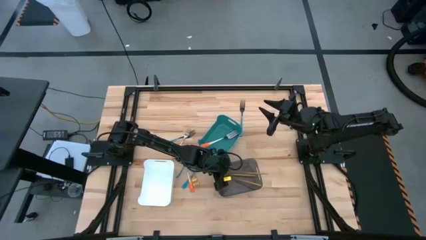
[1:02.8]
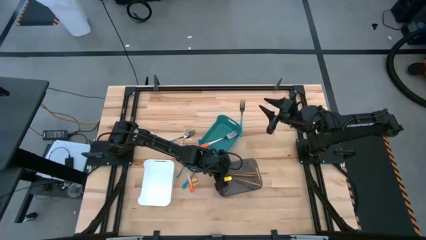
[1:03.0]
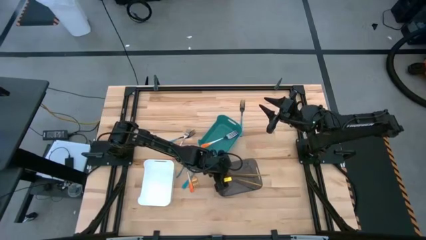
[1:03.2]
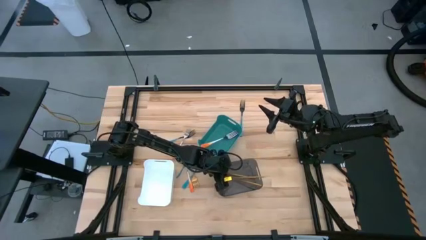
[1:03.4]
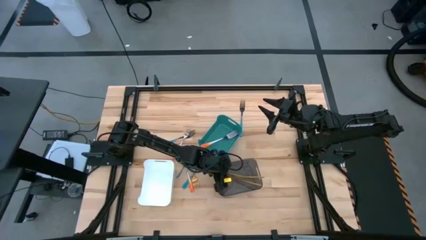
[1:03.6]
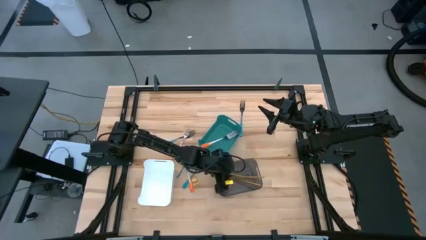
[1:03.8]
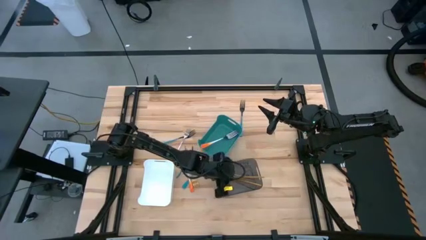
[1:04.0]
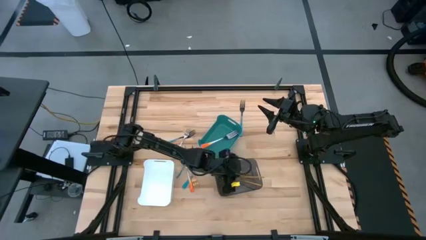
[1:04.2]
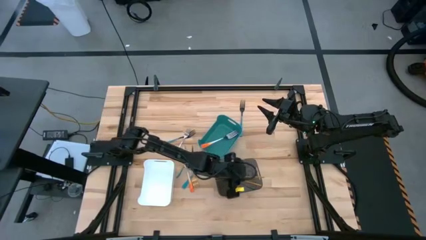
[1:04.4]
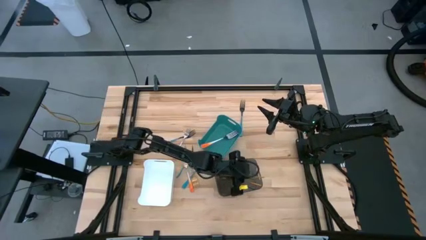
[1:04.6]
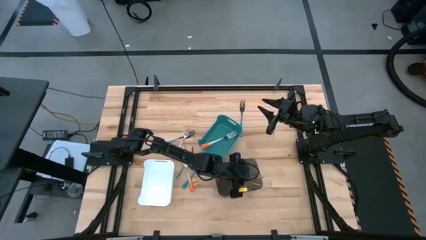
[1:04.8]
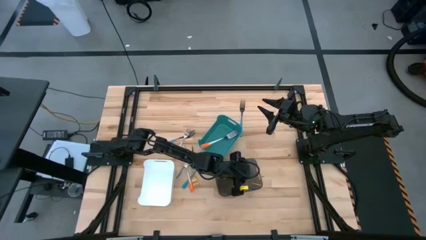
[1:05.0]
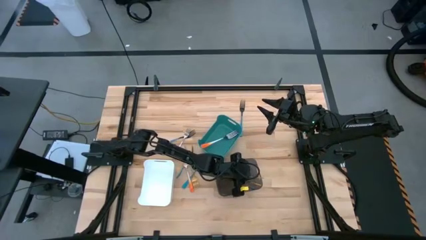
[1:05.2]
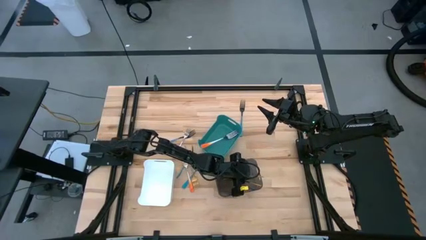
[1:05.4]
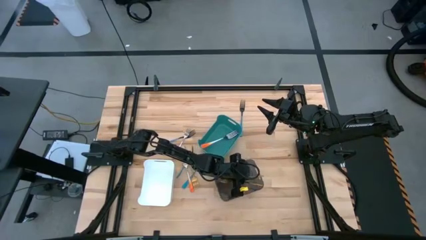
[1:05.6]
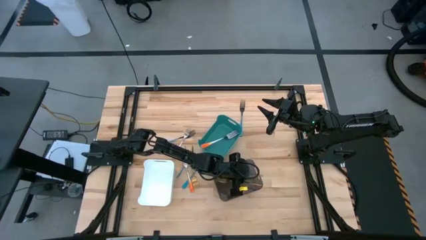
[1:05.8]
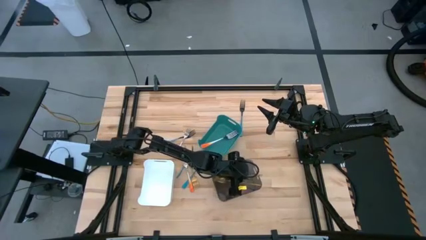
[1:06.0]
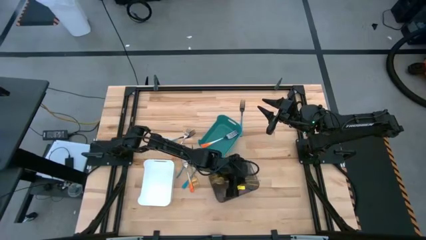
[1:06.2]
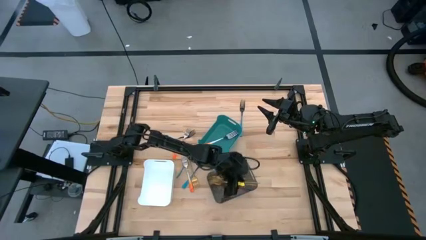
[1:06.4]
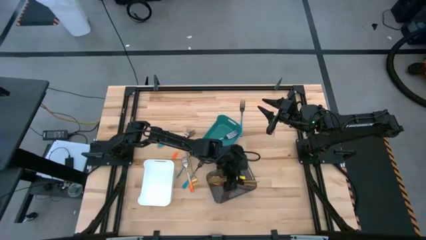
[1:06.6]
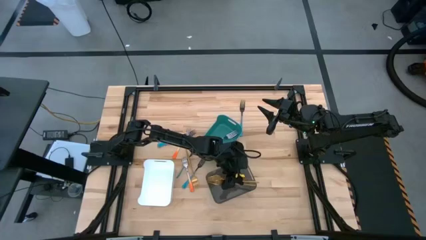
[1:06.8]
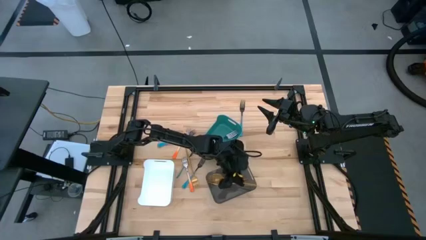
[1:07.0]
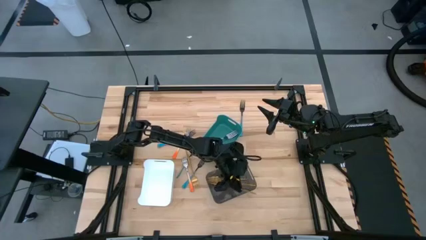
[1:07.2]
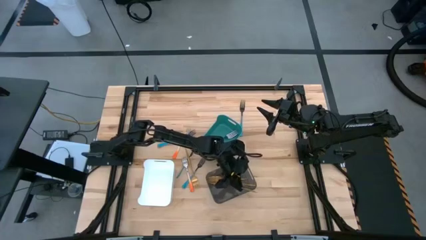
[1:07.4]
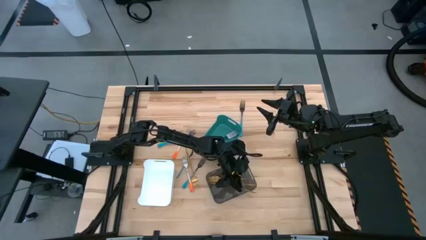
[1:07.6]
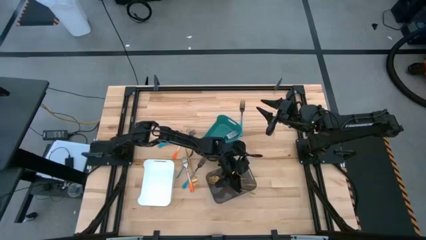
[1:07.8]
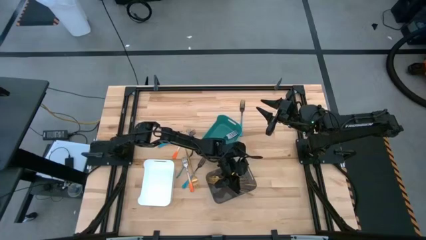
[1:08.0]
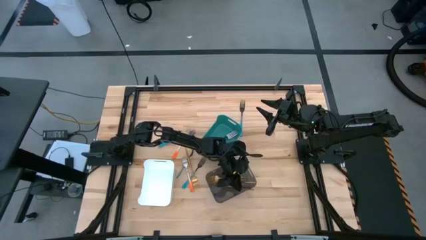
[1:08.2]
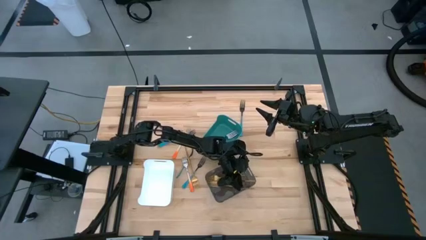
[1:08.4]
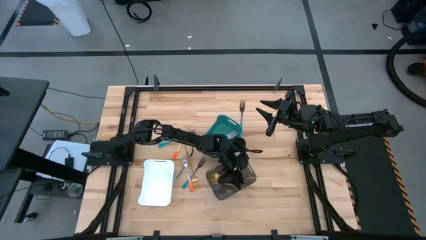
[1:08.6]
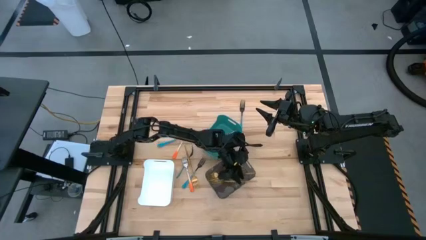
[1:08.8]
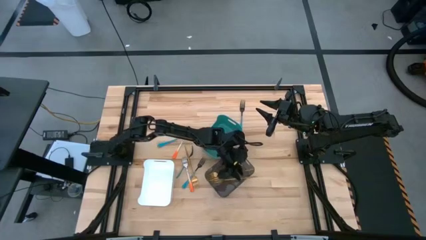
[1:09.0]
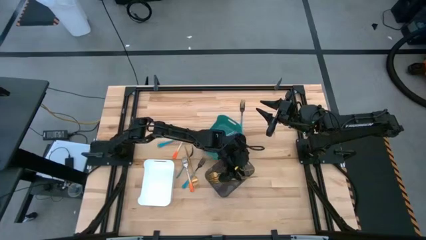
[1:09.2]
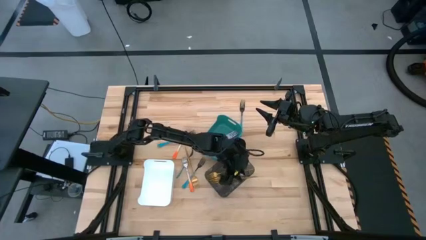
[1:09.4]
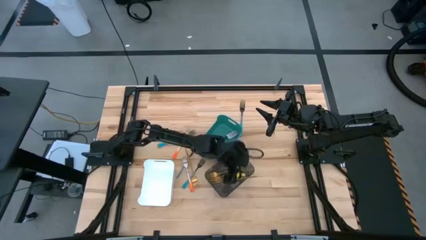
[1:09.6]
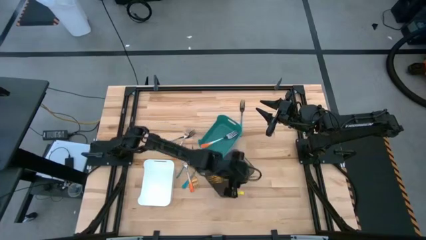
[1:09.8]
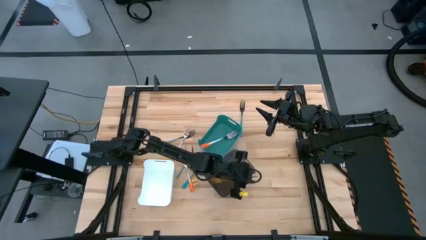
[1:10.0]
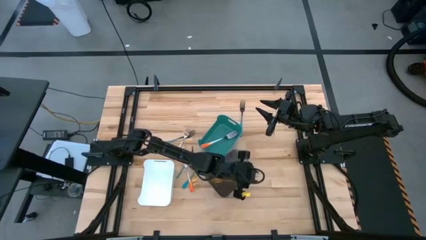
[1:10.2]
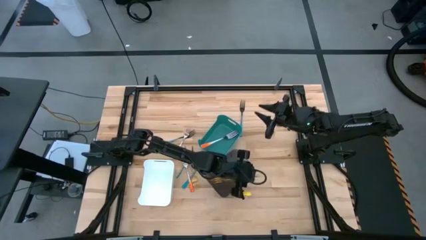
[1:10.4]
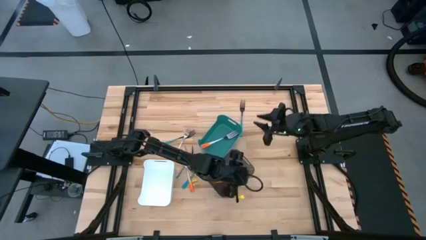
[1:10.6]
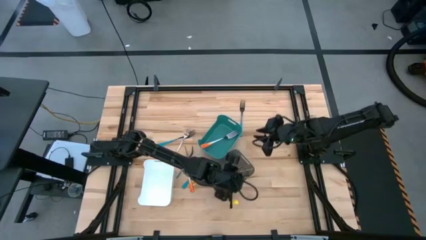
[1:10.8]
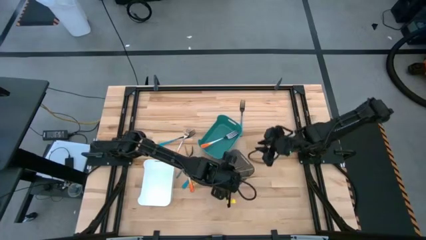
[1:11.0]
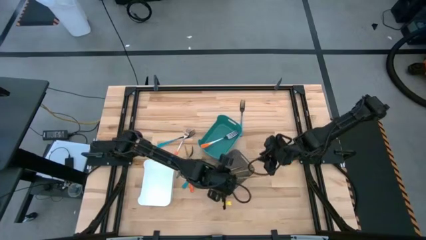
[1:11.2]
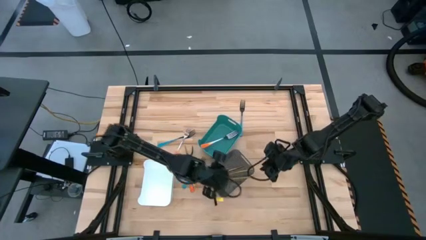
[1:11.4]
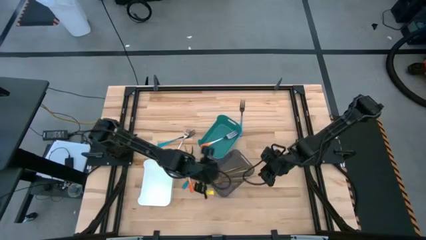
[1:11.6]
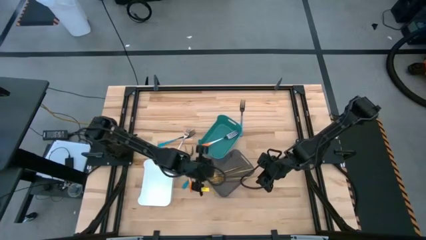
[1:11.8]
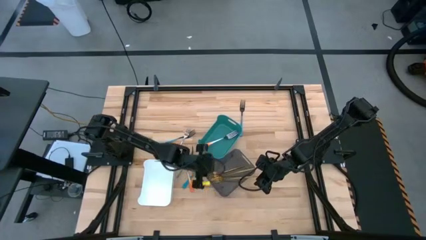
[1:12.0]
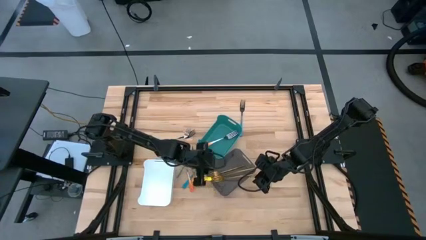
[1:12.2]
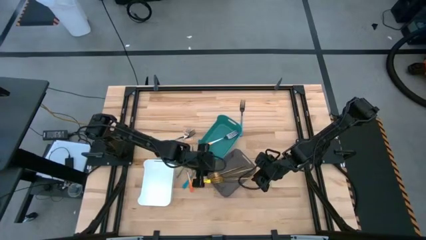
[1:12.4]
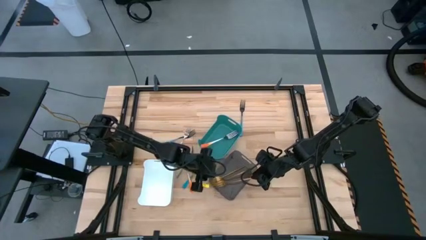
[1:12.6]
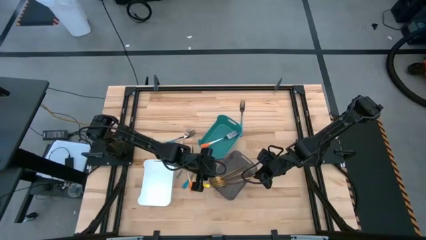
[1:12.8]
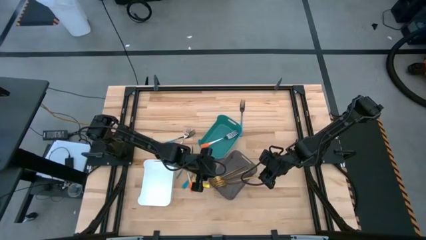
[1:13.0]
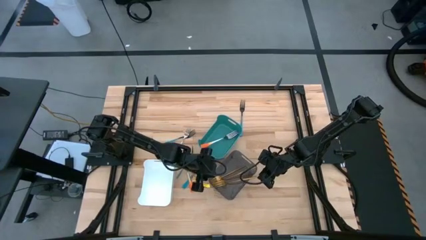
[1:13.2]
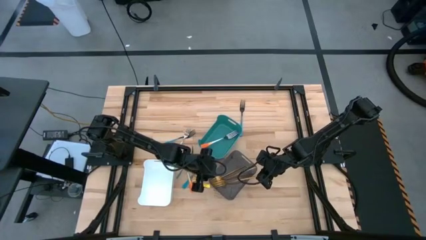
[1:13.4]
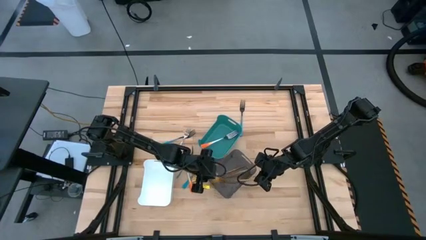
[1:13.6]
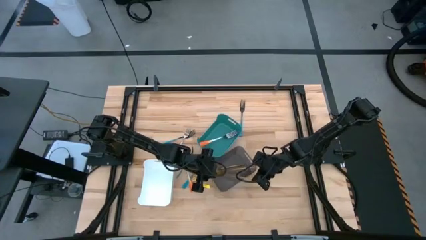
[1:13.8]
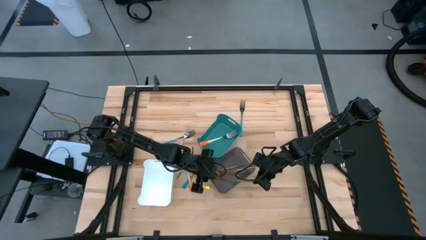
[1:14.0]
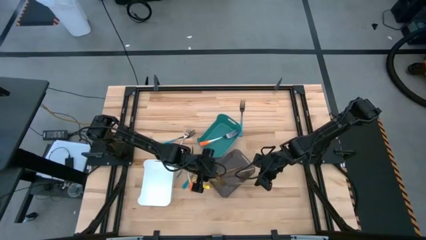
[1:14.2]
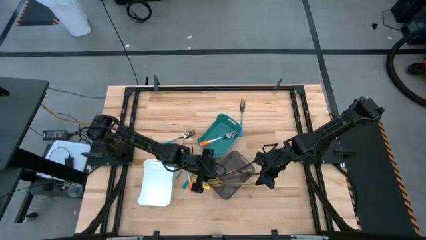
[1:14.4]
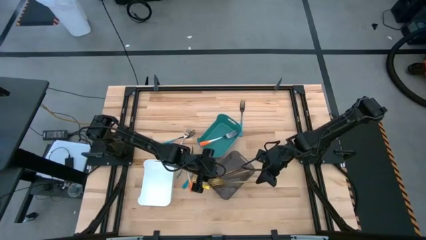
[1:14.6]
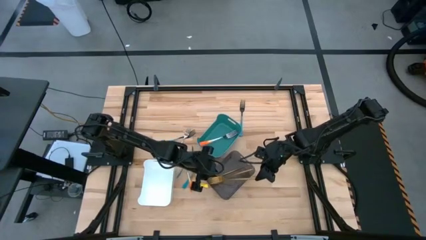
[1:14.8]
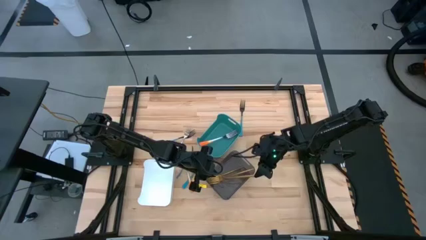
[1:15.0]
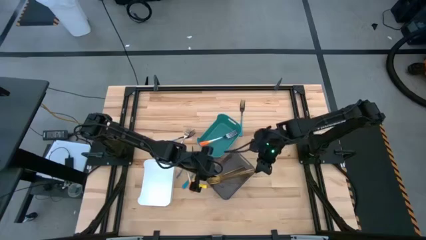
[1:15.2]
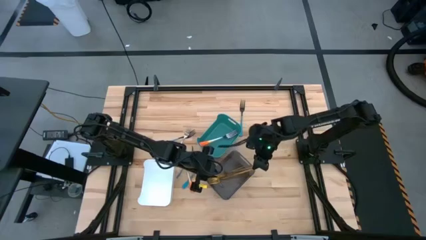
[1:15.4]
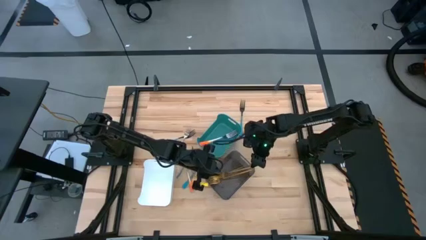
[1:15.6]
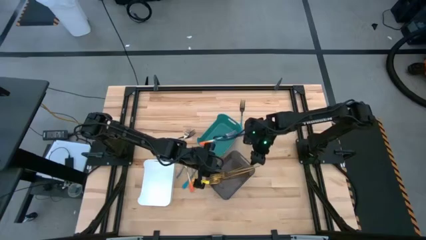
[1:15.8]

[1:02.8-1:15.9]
Task: Sort silverware by color (type)
Put the gold fork into the black transparent bin

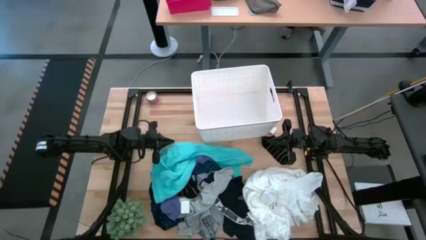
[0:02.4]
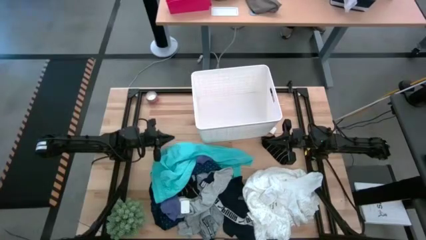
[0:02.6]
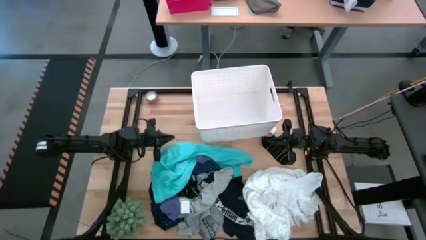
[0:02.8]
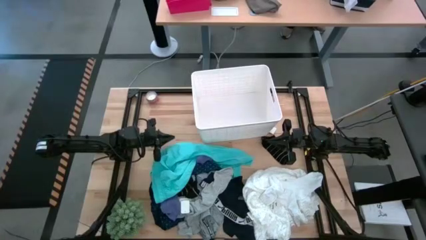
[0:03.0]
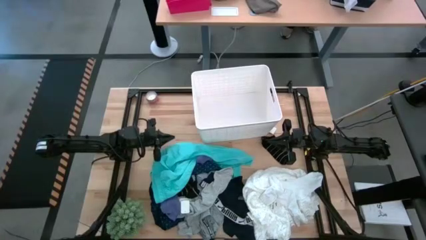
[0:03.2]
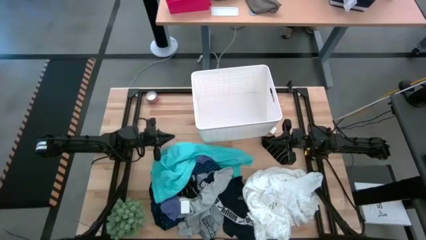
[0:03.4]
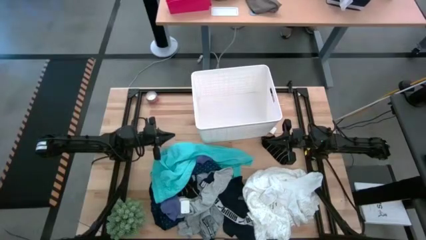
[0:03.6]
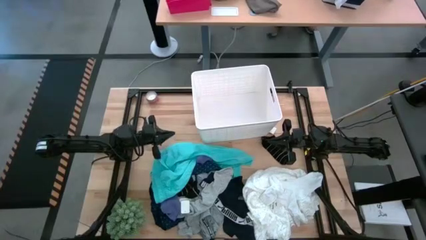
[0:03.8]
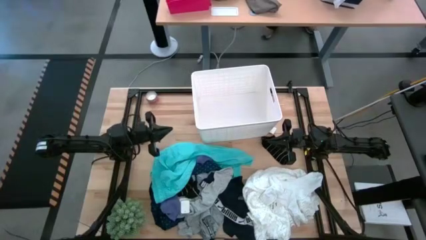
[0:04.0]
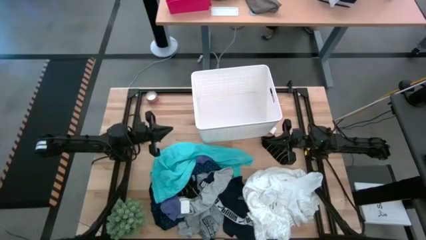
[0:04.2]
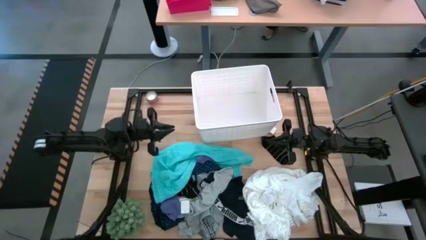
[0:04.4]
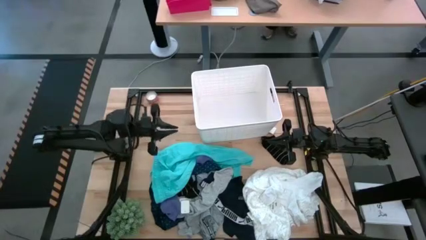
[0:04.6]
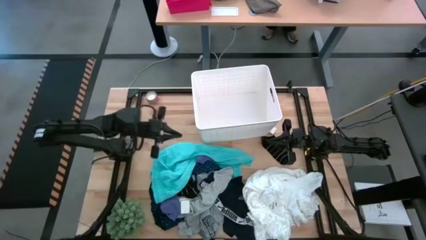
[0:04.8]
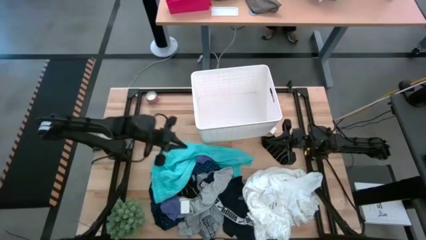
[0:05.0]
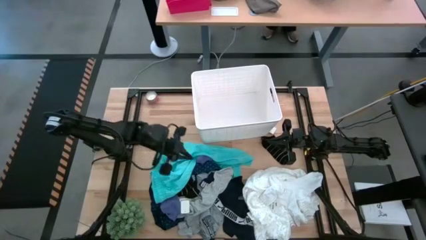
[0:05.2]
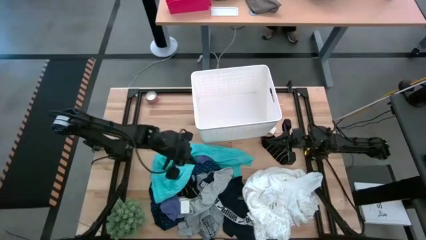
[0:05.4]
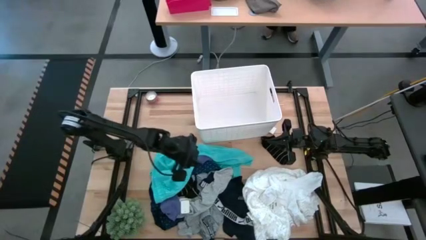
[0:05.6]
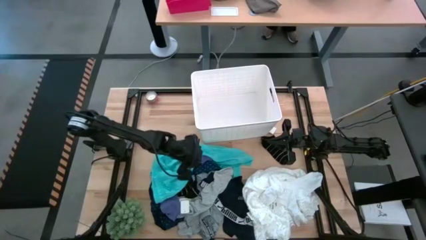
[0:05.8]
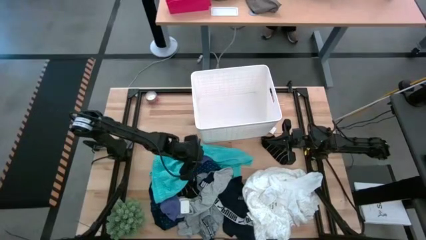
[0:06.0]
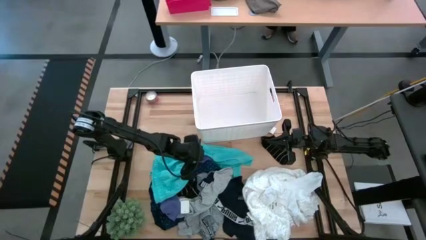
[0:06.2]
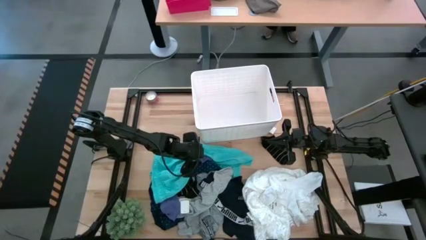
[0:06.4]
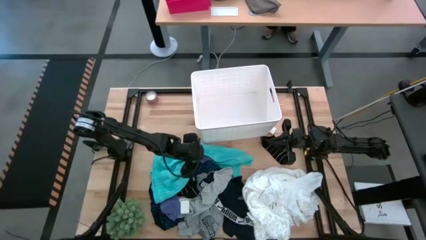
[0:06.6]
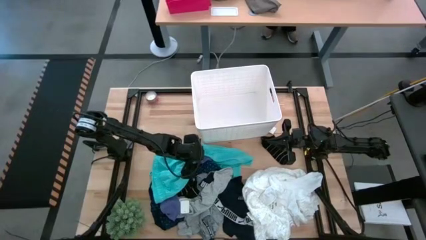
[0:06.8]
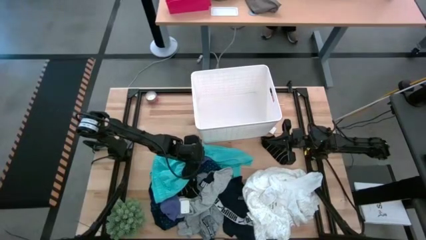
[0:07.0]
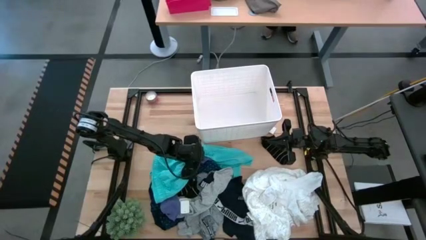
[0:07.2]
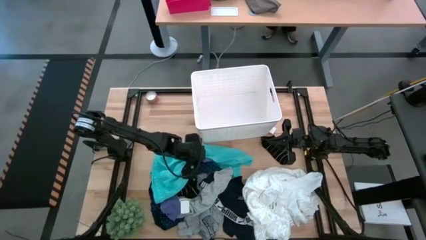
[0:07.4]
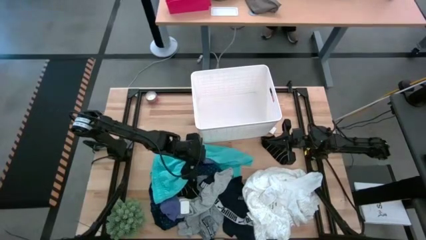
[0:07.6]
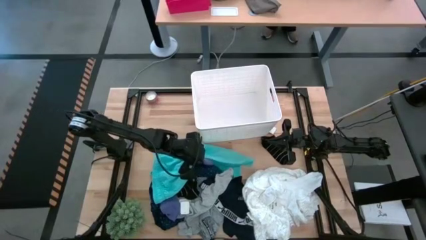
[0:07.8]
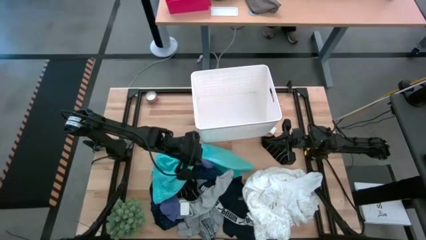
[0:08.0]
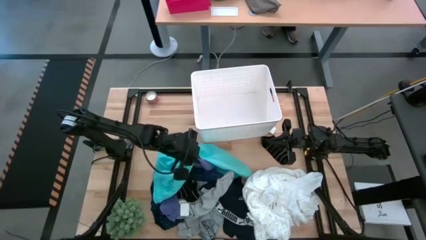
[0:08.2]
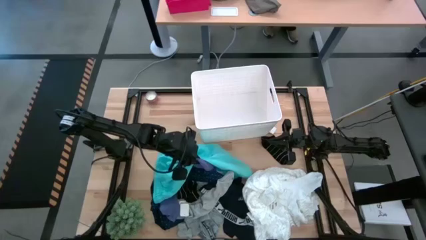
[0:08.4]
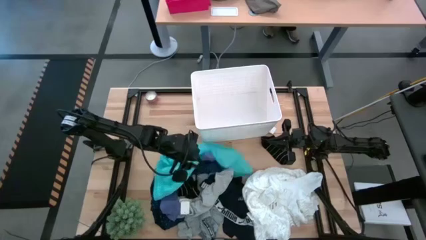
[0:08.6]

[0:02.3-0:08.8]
Task: Sort clothes
Put the purple sock in the bin
